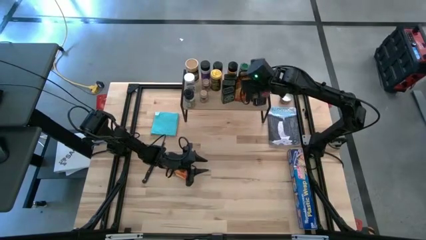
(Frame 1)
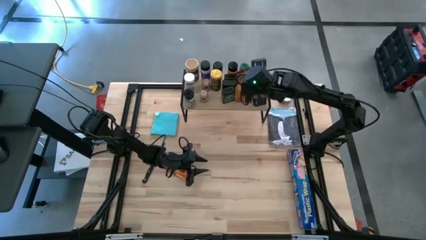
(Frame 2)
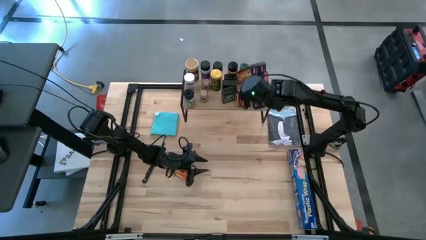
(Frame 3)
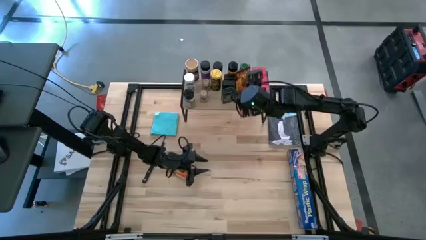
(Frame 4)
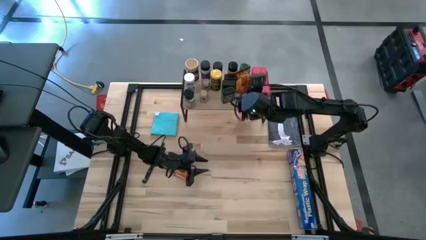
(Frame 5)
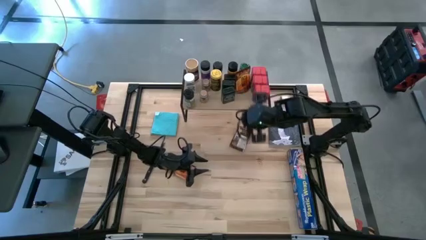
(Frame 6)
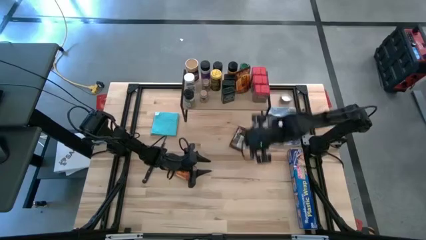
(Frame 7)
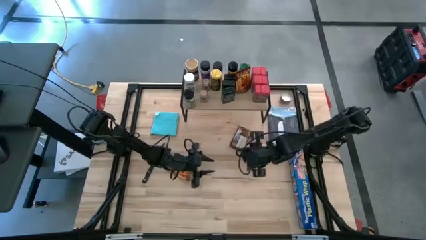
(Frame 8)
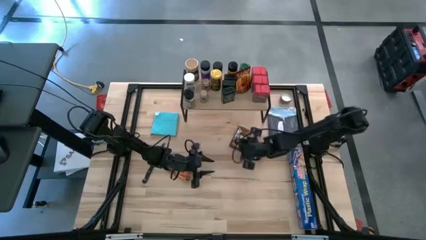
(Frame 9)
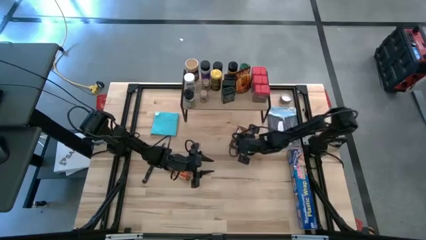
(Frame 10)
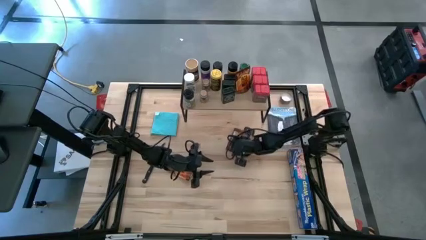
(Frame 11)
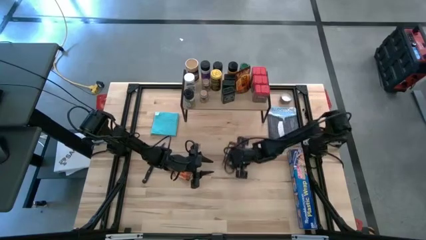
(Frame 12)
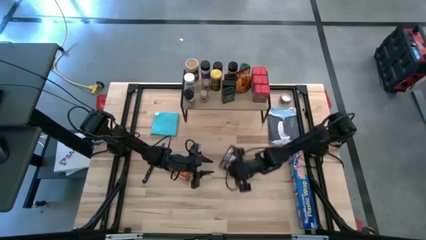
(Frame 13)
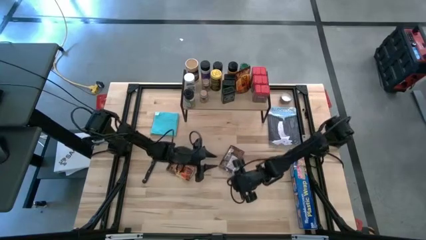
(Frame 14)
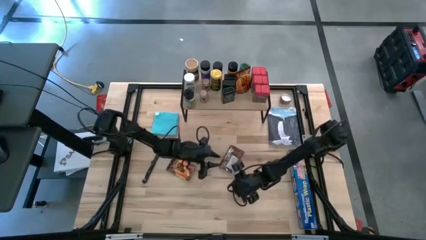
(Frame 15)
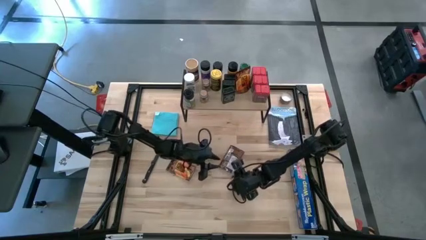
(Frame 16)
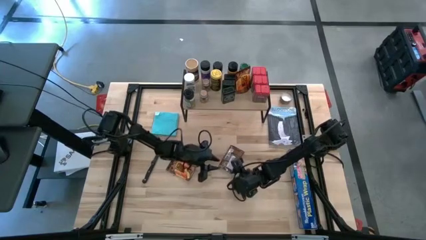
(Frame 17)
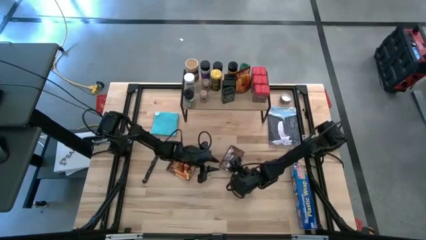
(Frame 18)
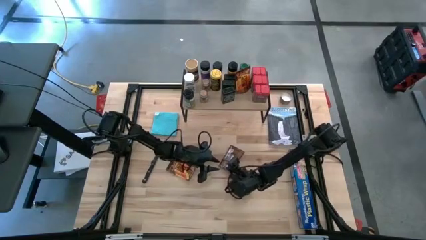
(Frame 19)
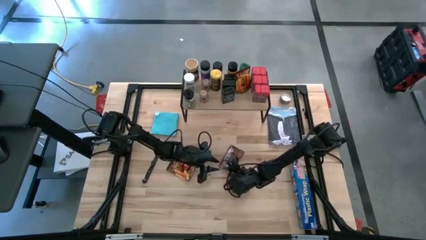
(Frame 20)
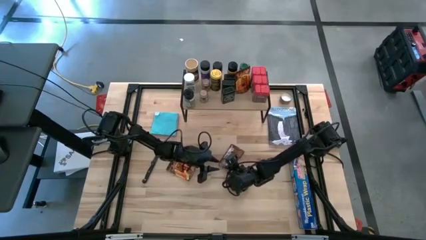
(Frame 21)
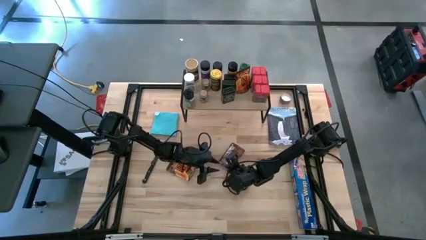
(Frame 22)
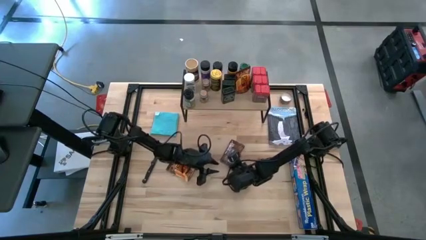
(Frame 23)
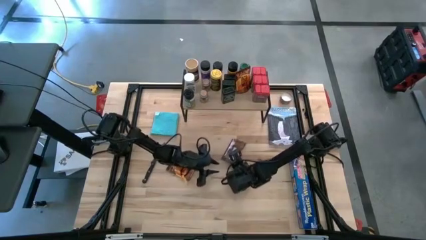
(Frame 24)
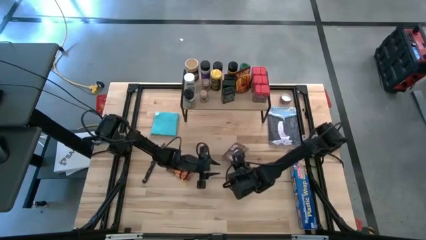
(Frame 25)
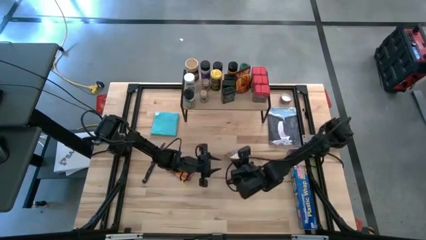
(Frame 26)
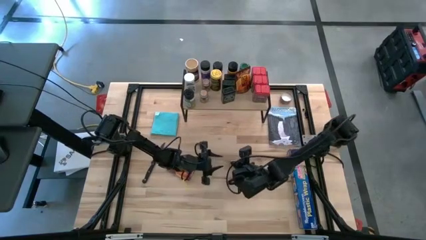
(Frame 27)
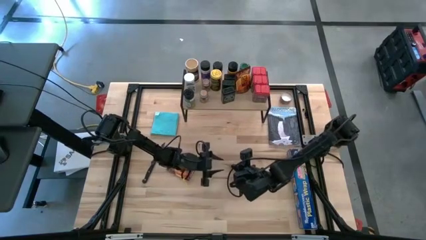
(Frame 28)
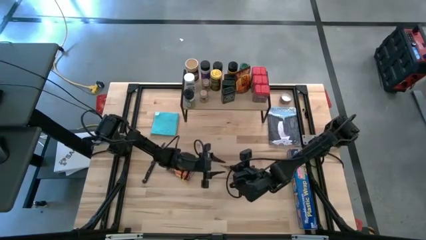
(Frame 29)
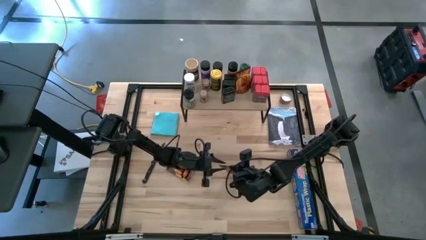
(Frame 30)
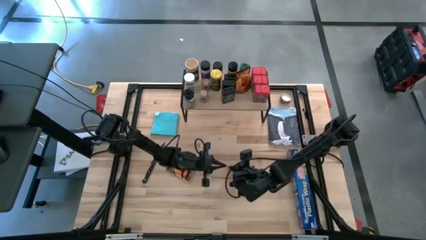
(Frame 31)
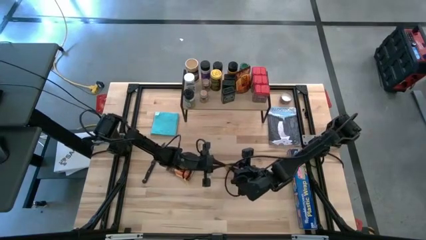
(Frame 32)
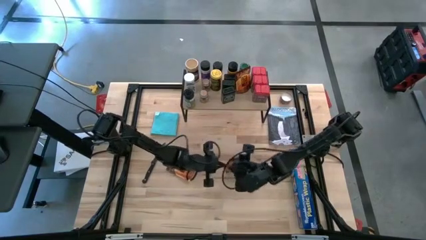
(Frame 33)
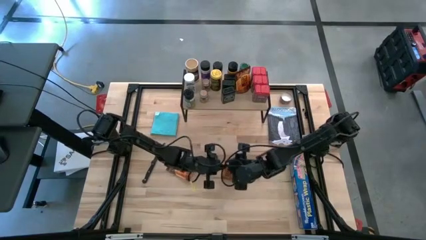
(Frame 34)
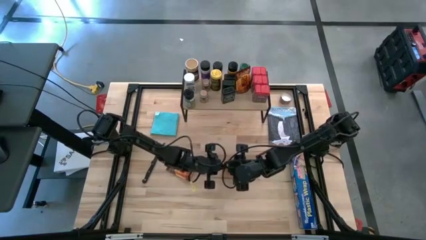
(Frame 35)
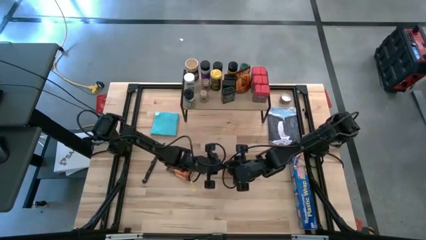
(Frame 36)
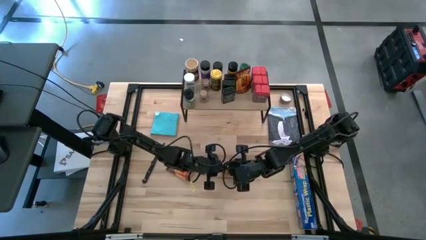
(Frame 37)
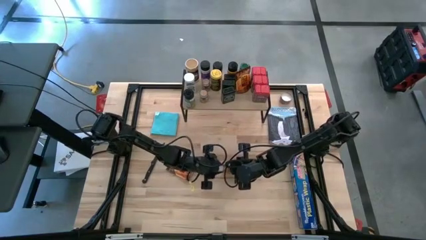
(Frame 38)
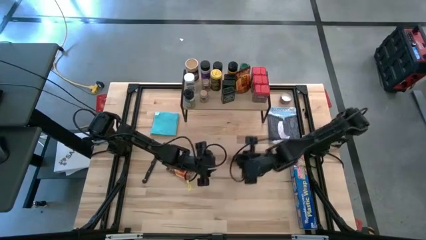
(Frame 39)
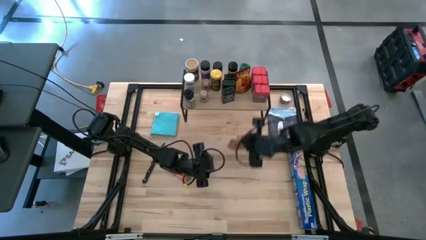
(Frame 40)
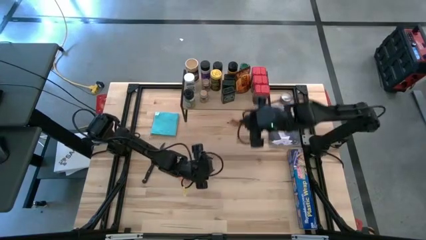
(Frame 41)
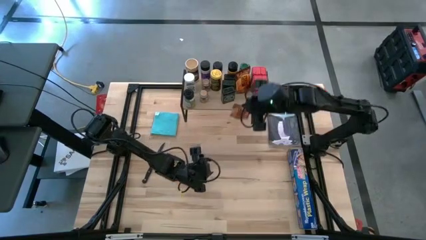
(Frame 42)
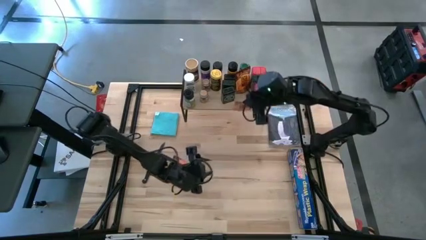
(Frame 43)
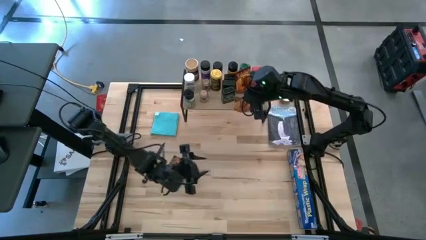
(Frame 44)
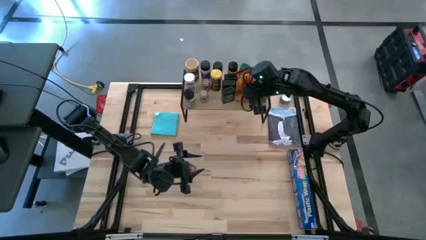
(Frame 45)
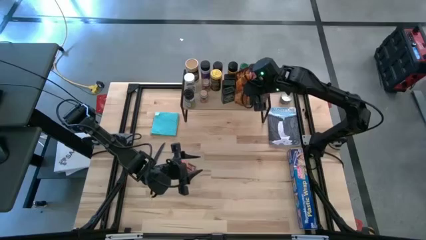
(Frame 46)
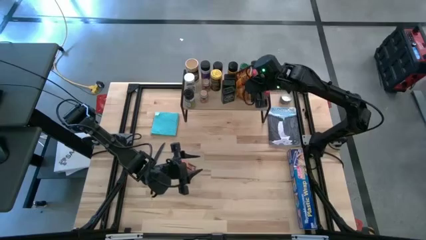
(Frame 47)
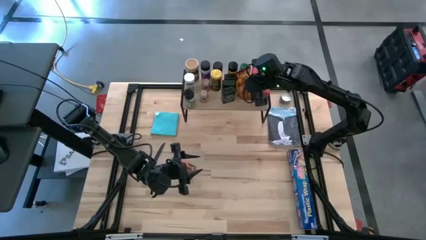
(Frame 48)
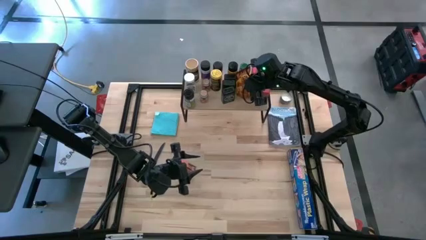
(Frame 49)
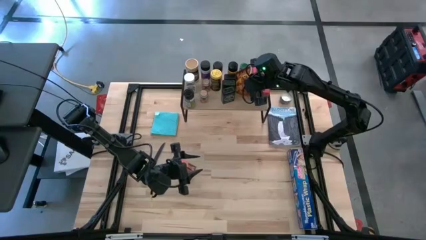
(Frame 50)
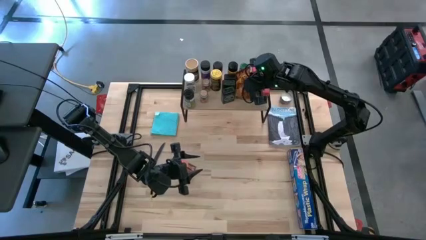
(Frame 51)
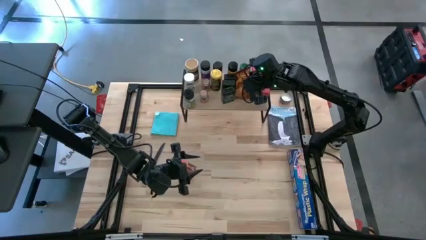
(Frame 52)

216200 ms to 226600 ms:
Task: Shelf spices
Put the orange seasoning bag on the shelf aligned with the other orange seasoning bag

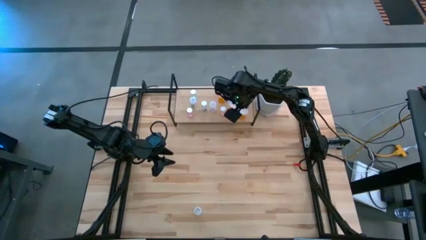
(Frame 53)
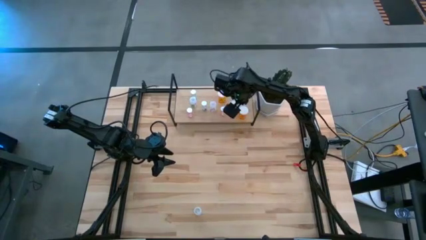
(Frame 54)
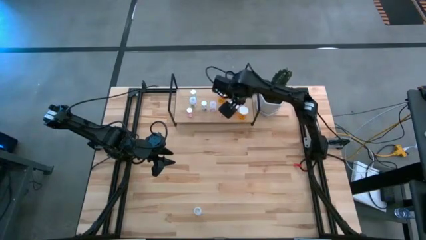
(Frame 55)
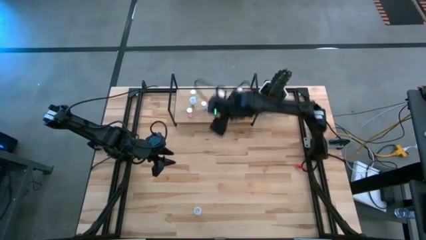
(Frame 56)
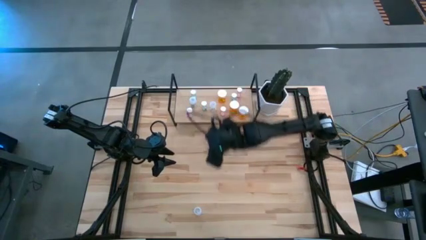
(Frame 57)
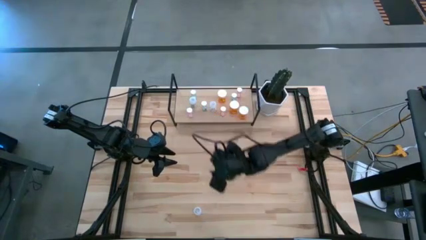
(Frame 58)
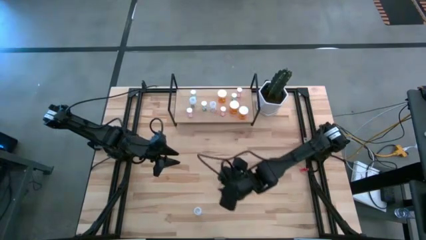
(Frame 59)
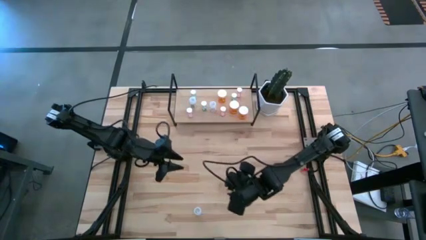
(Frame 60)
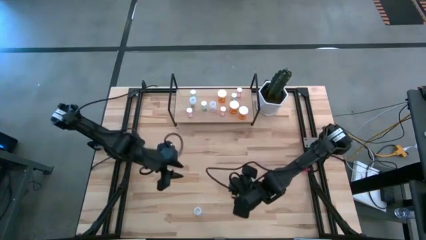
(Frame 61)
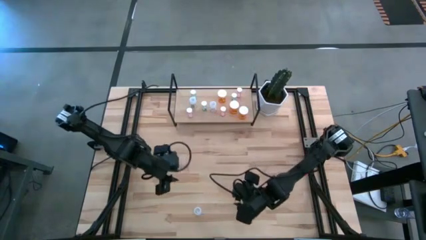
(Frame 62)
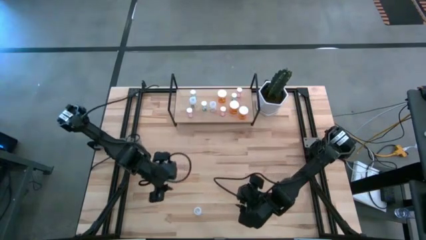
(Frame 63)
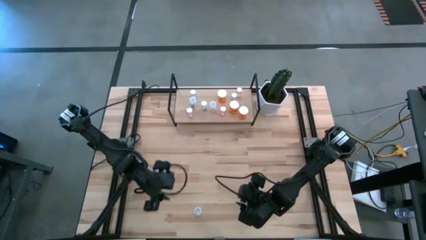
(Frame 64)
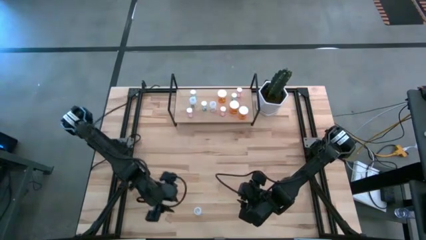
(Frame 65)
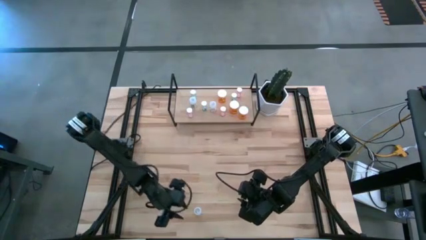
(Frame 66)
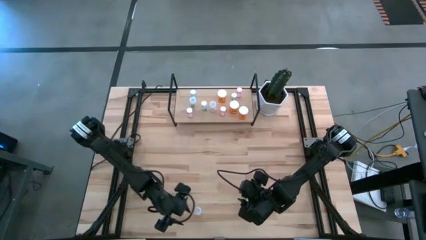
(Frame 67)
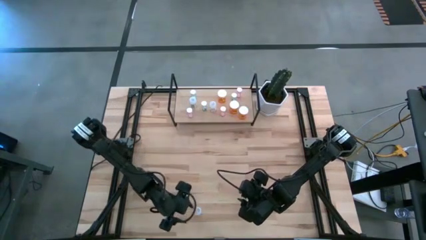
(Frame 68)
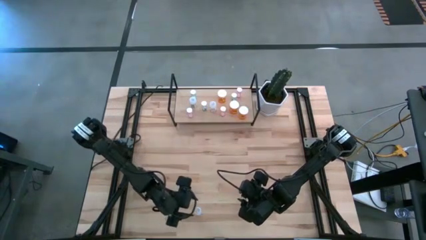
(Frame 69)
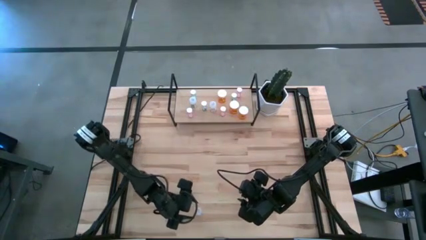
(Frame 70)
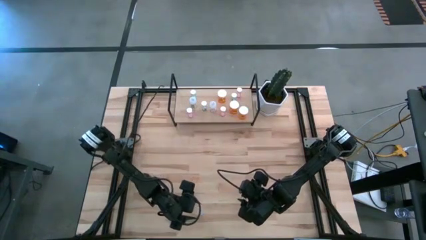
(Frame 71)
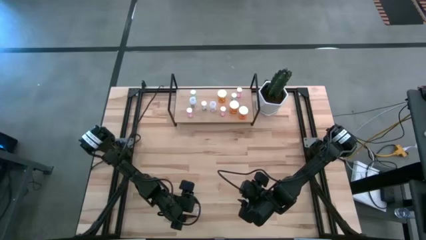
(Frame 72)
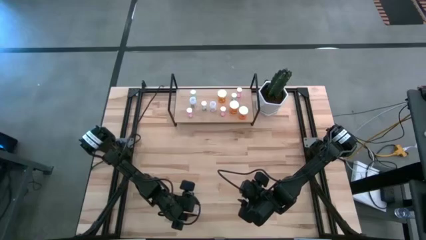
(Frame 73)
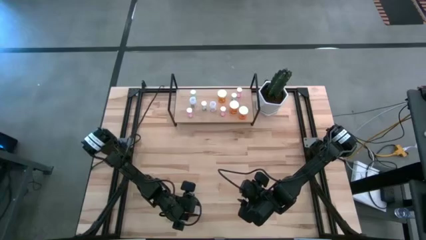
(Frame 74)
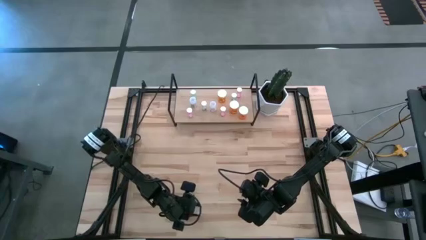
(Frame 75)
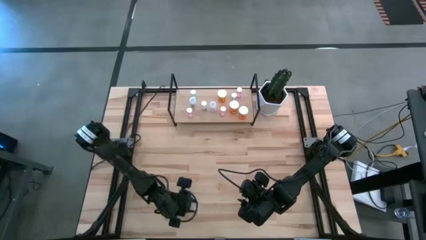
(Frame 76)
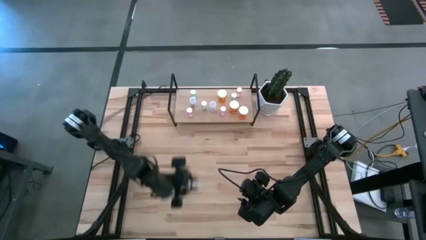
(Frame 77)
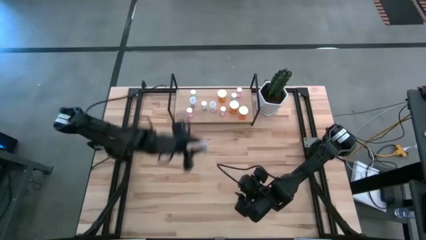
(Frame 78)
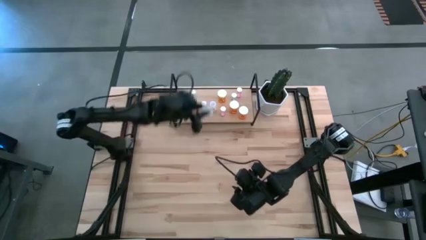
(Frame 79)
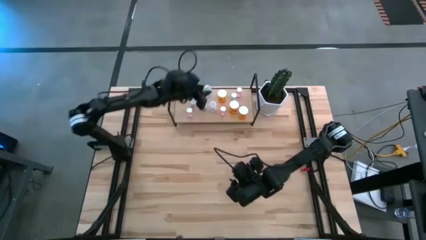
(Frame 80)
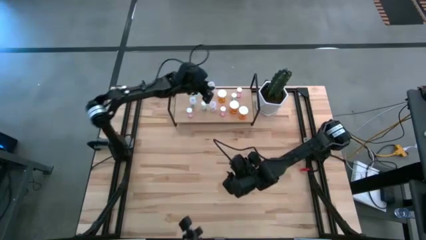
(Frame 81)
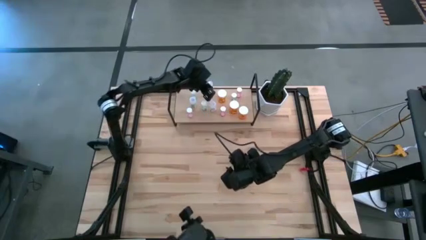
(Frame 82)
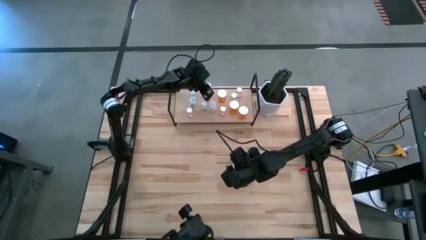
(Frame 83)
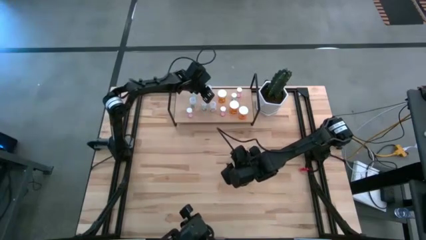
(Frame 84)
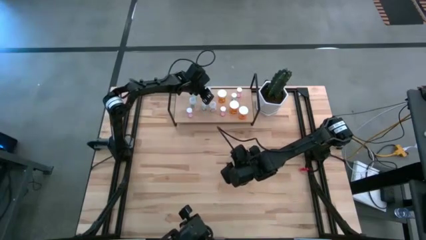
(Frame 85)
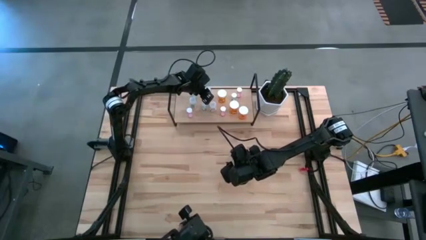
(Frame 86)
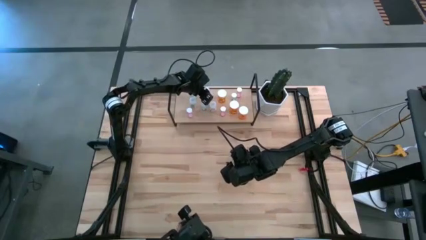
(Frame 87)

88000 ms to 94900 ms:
Task: Pick and place medicine bottles onto shelf by color
Put the transparent pill bottle on the shelf
